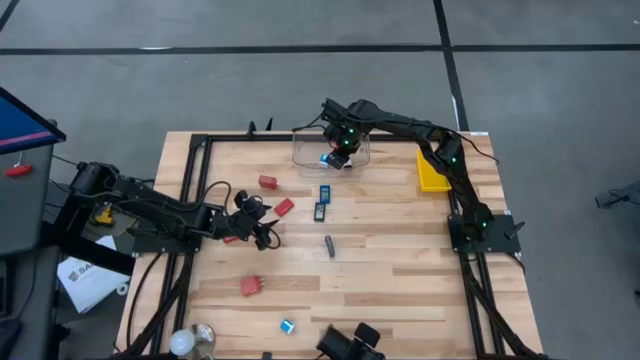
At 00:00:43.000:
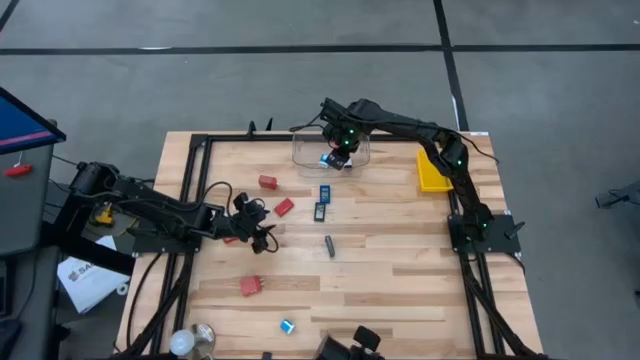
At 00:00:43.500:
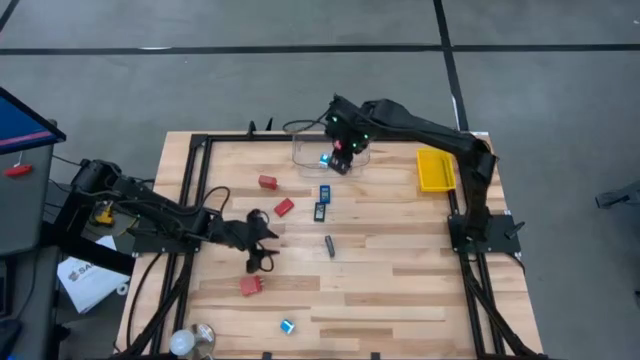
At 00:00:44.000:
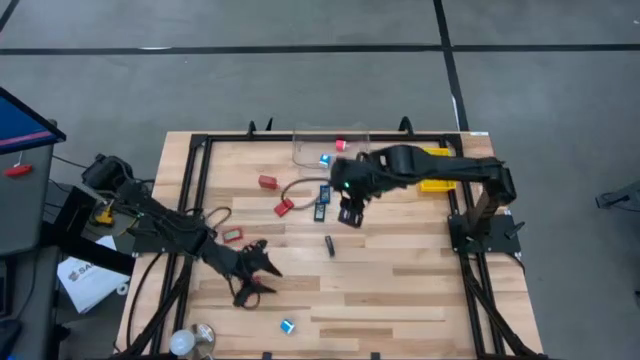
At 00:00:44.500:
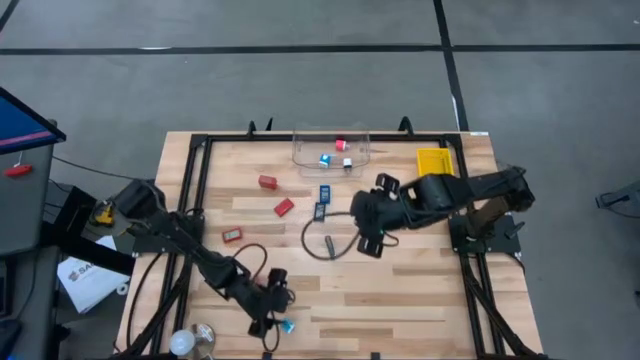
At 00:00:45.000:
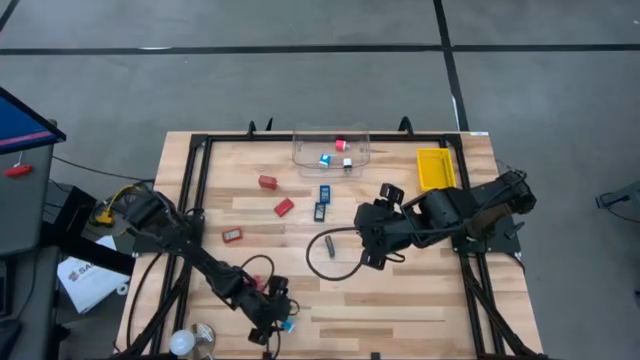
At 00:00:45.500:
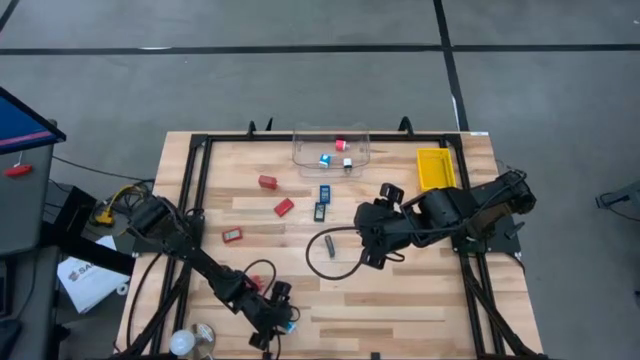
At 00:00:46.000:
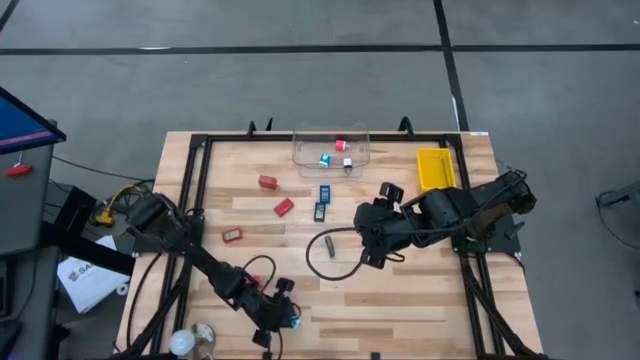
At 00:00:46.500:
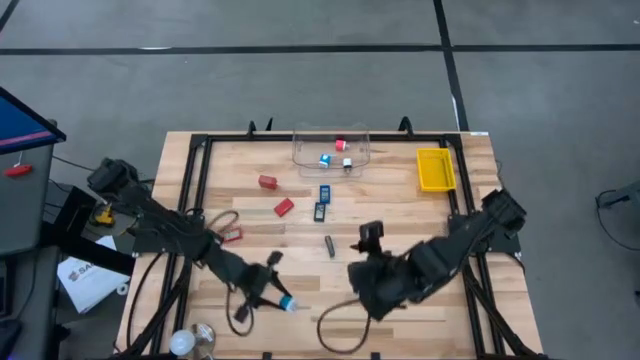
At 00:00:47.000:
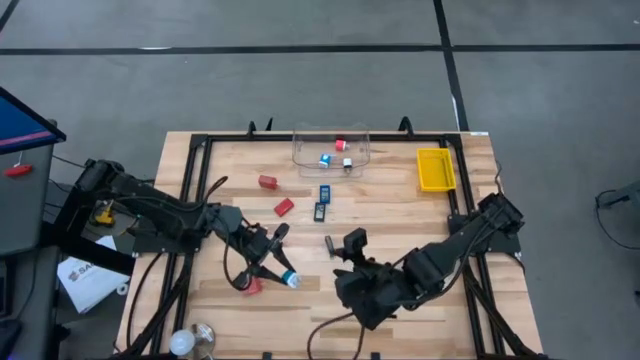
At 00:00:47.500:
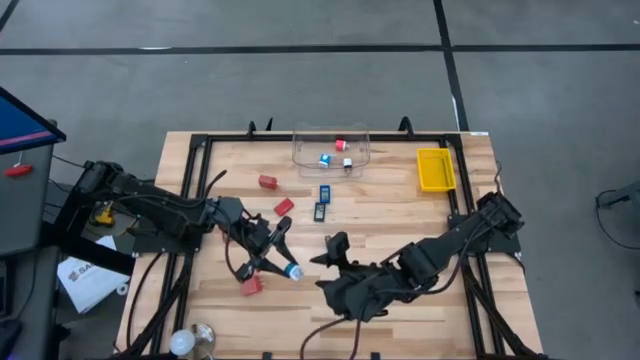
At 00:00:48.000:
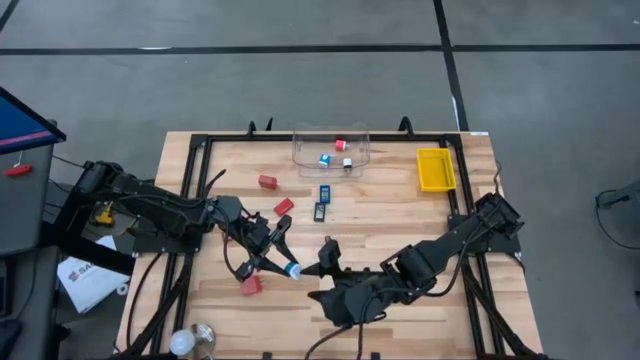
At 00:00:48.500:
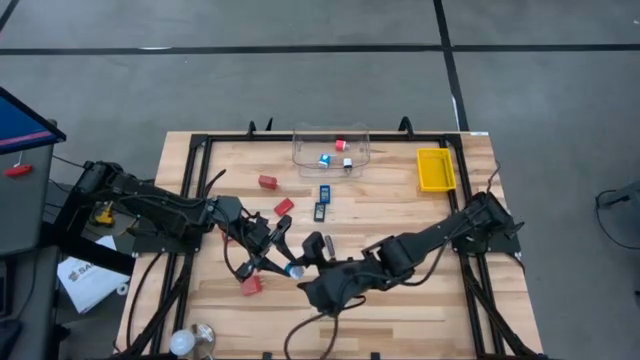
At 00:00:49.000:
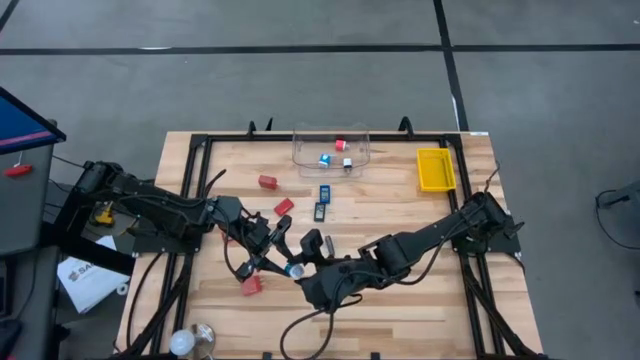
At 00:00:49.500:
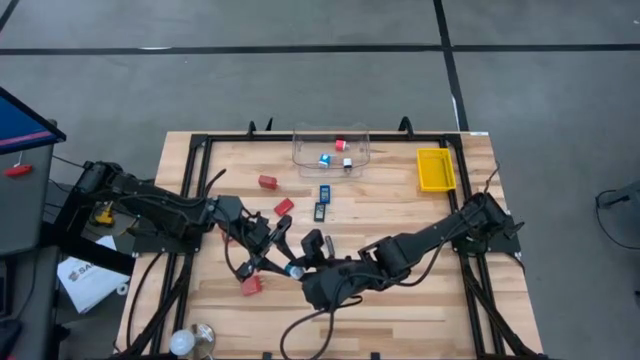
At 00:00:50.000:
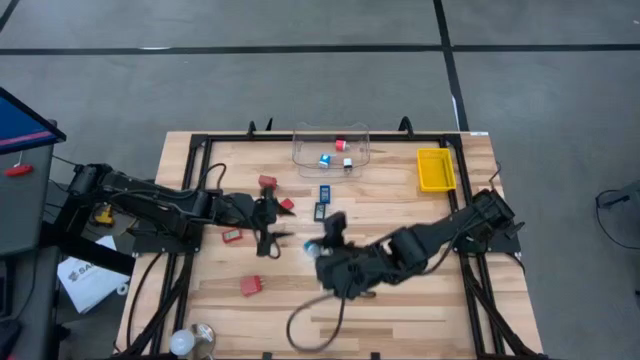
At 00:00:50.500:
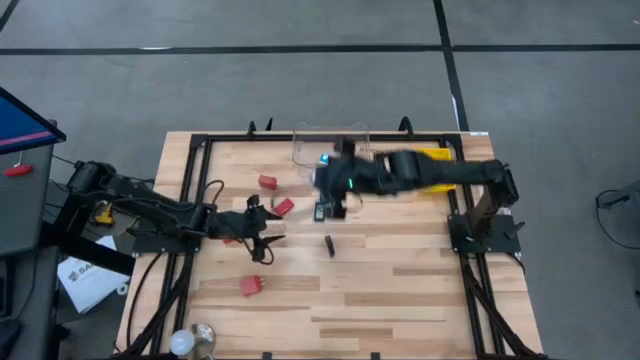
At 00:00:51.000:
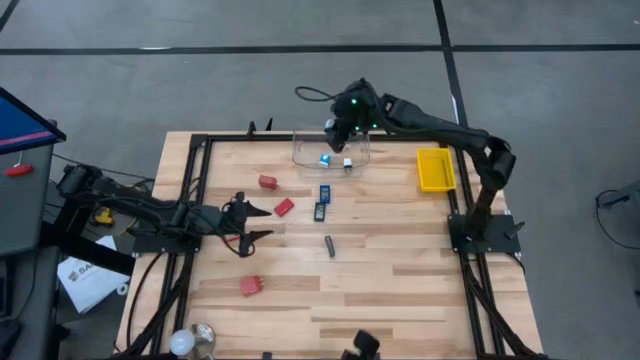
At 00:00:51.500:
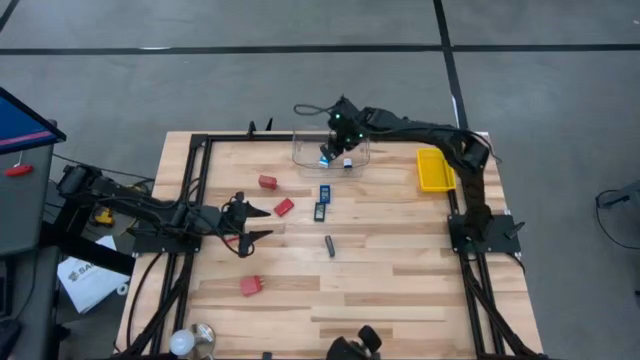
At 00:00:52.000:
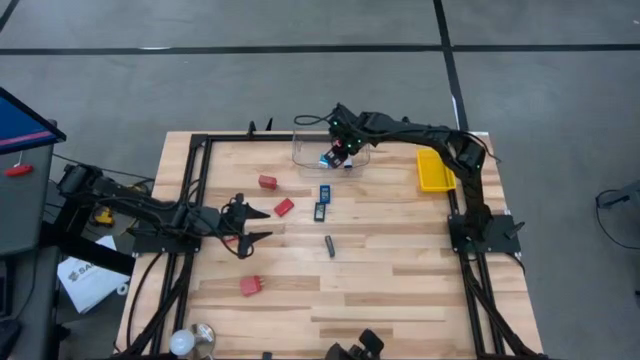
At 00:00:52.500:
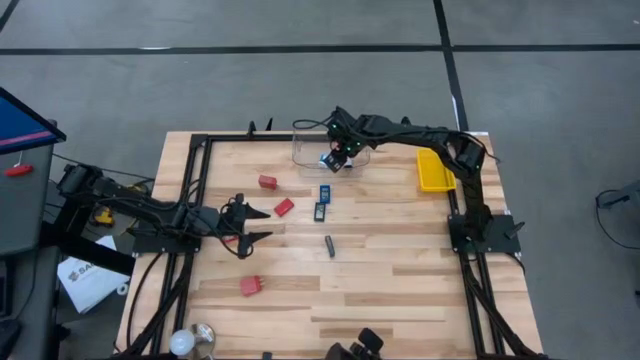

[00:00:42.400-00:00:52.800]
Task: Pick & Place Office items
Put the blue charger adapter into the transparent bin

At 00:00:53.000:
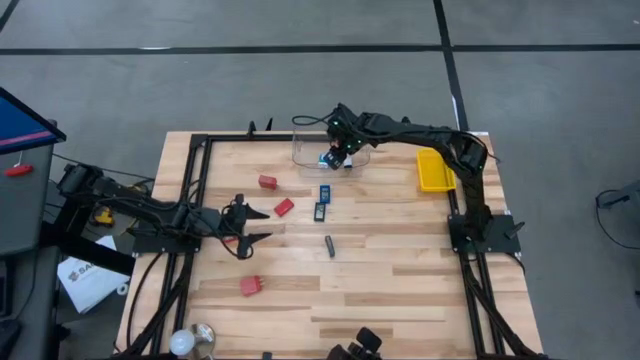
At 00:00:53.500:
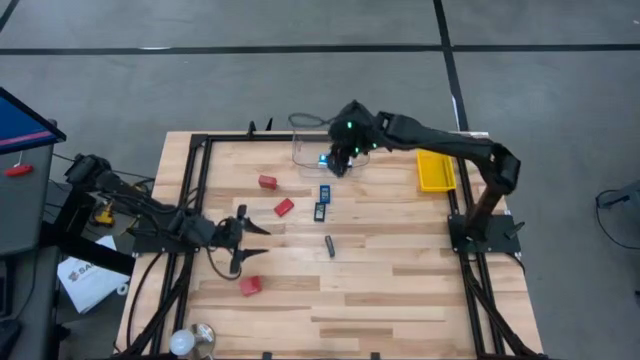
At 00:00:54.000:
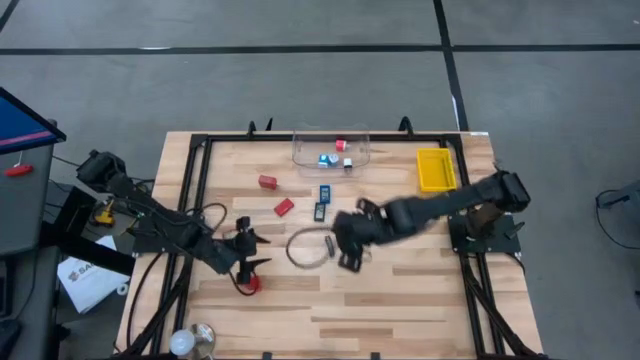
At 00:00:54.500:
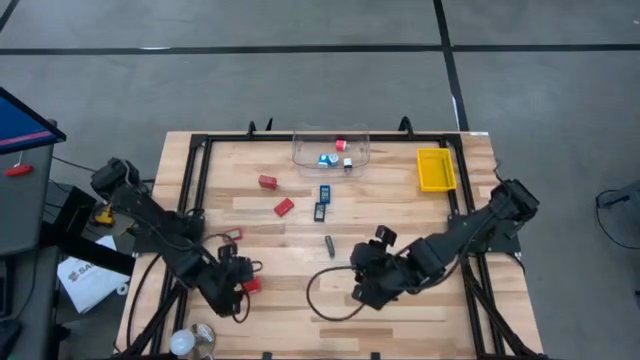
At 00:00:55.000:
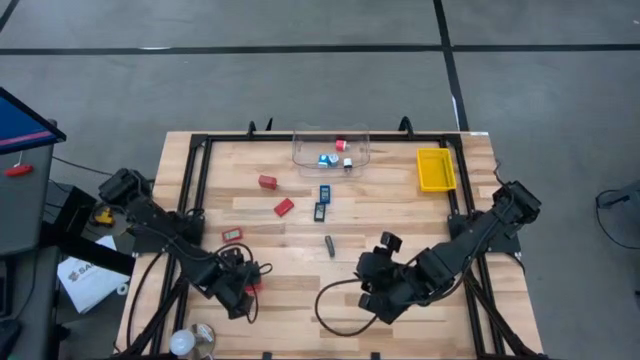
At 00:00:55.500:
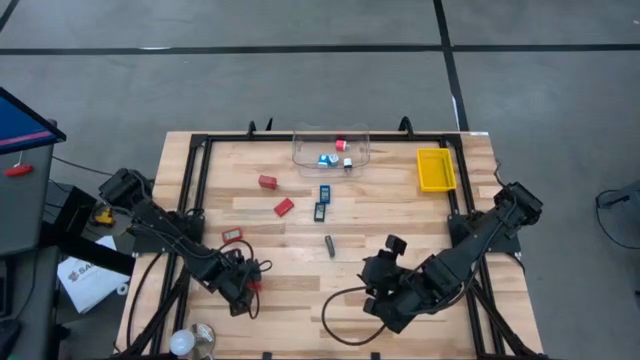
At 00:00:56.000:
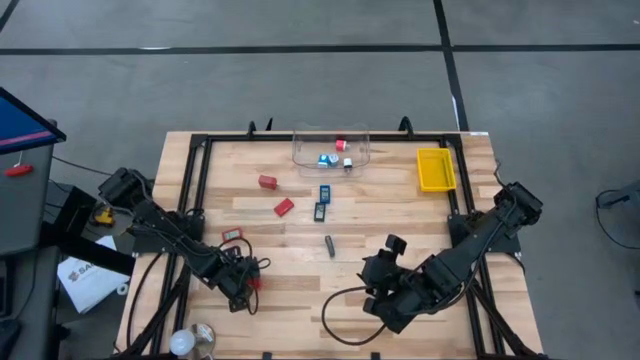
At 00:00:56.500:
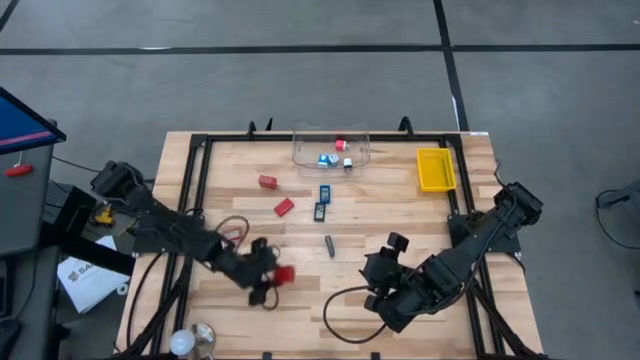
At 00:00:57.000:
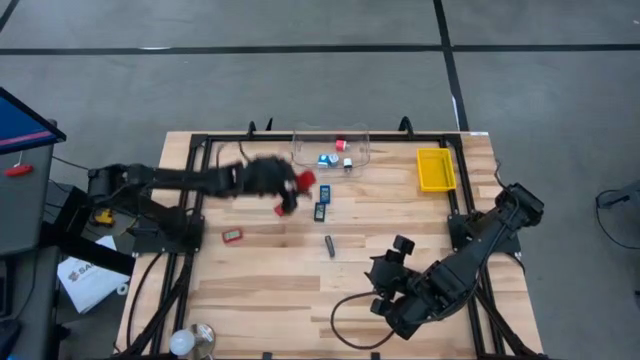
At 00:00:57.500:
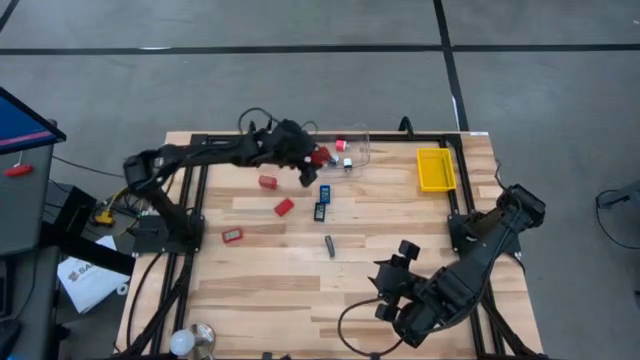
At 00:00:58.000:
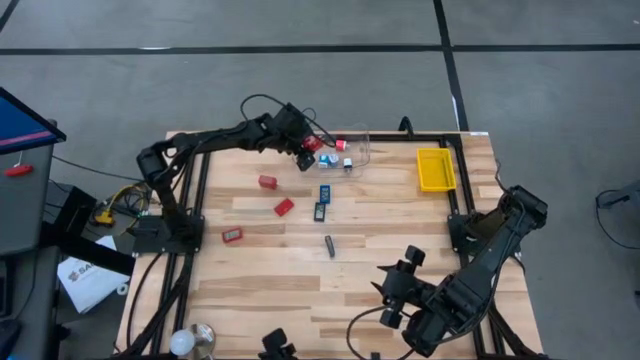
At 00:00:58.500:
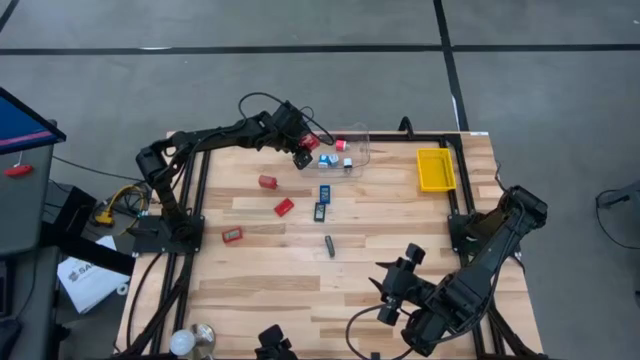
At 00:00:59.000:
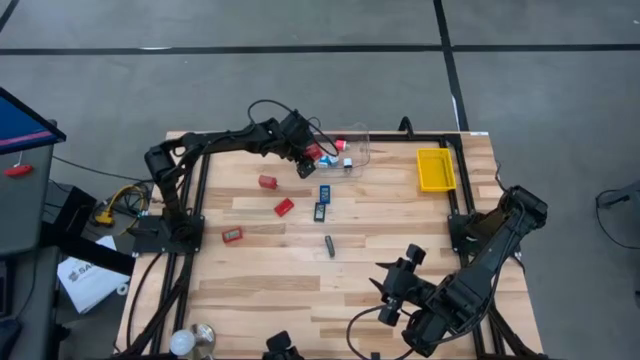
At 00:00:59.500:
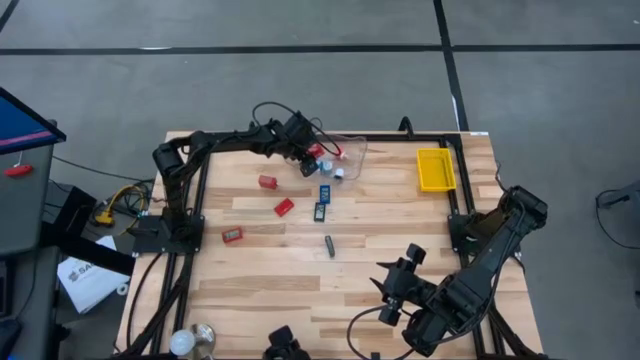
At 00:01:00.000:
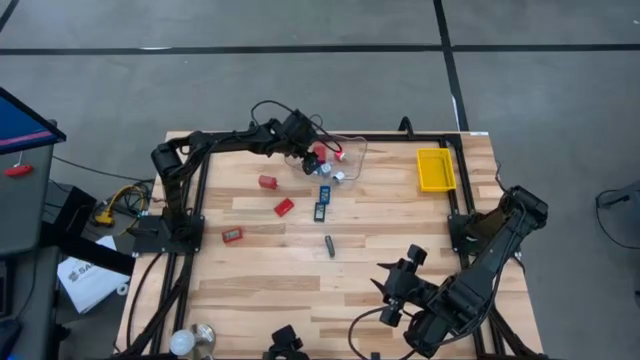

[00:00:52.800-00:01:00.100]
Put the bottom red charger adapter into the transparent bin

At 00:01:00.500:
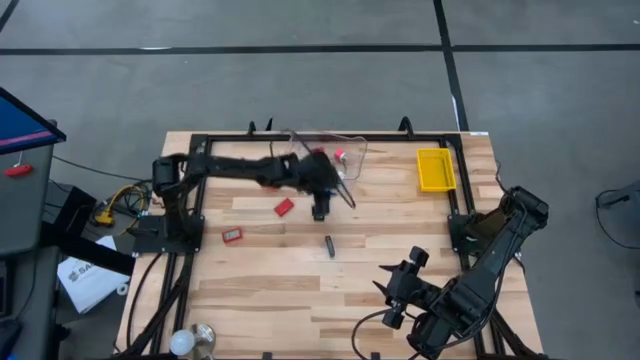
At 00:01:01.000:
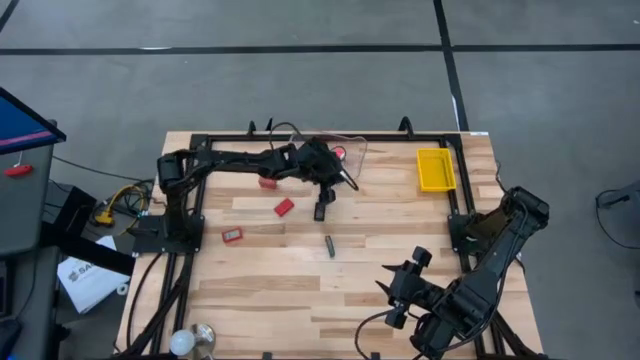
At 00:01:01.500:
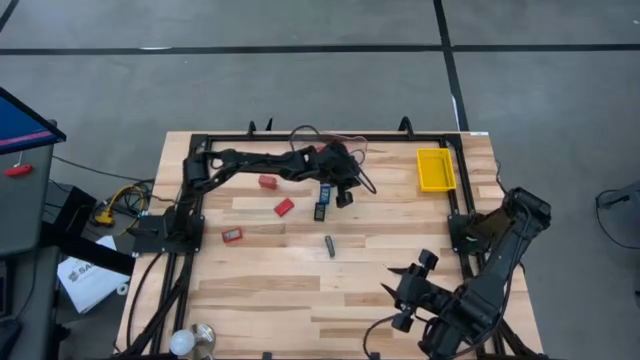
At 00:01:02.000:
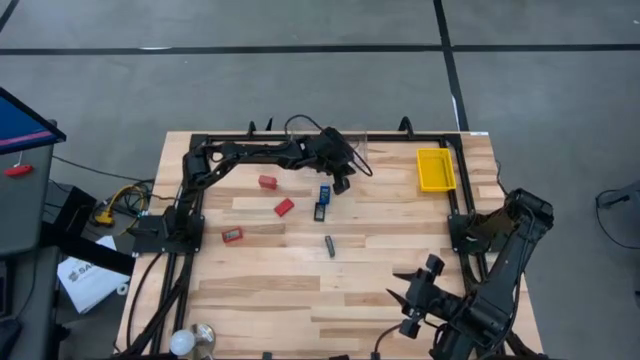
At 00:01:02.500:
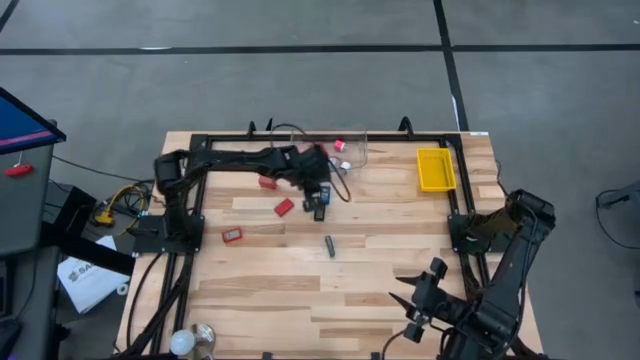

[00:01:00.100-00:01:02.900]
Adjust the transparent bin
